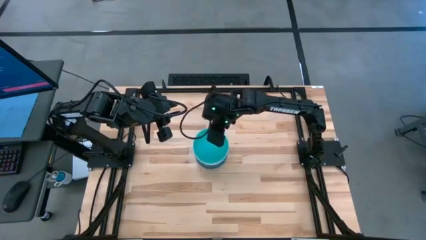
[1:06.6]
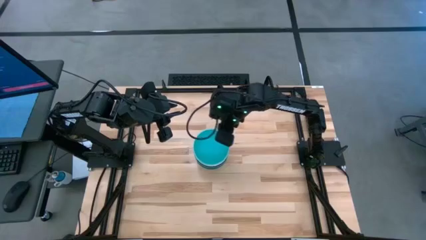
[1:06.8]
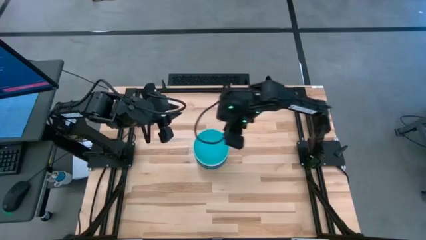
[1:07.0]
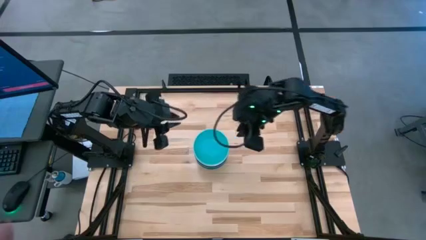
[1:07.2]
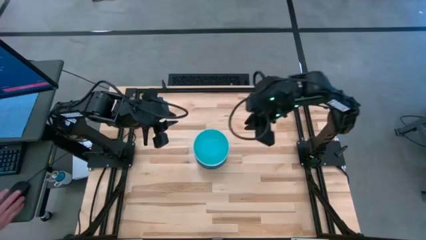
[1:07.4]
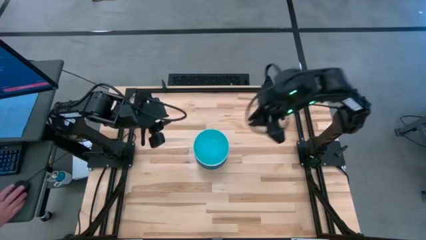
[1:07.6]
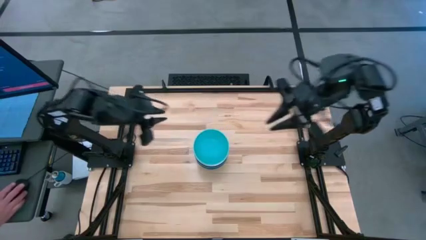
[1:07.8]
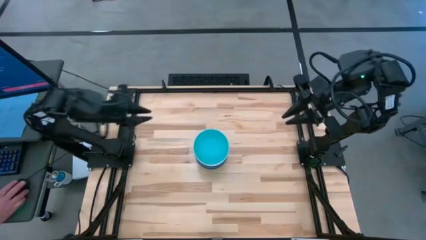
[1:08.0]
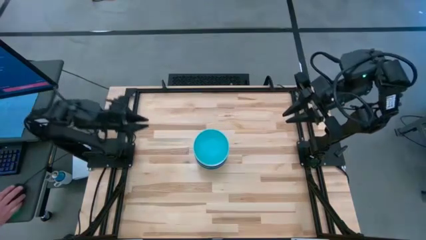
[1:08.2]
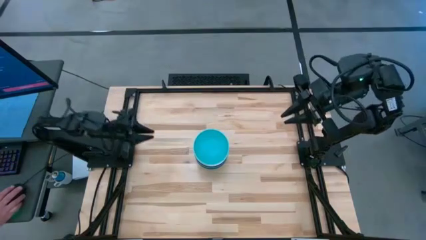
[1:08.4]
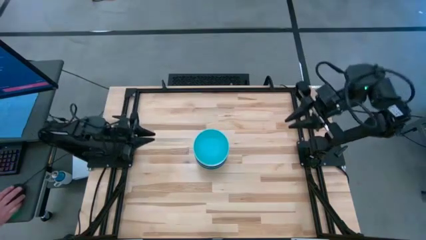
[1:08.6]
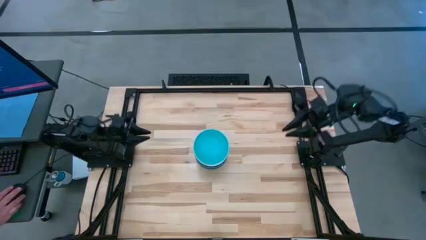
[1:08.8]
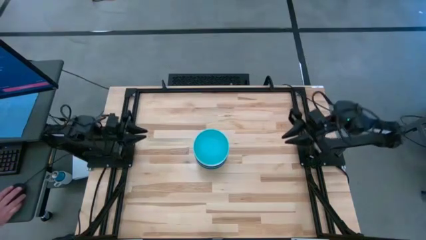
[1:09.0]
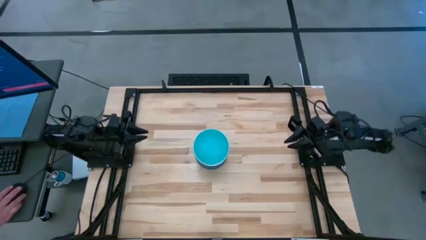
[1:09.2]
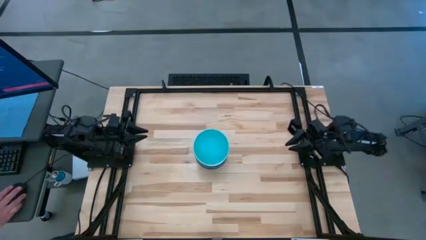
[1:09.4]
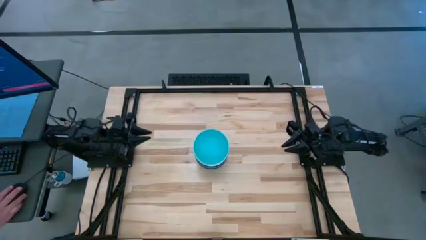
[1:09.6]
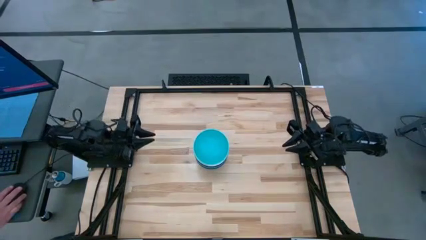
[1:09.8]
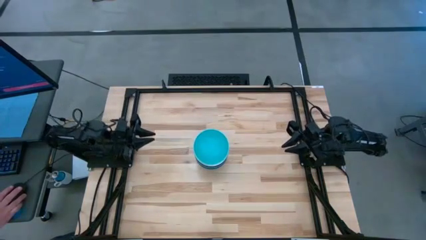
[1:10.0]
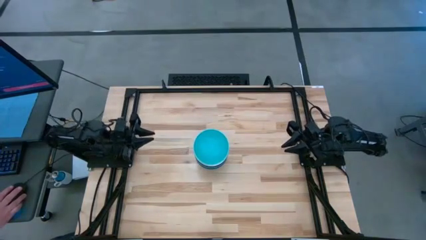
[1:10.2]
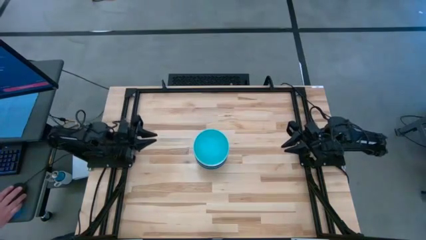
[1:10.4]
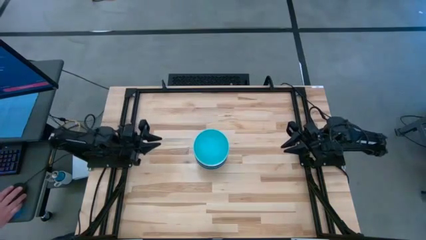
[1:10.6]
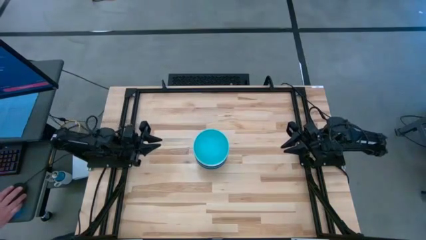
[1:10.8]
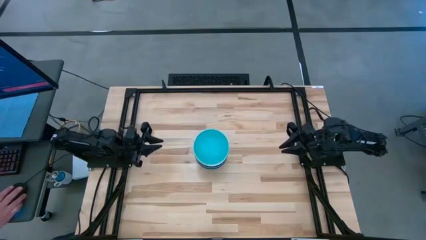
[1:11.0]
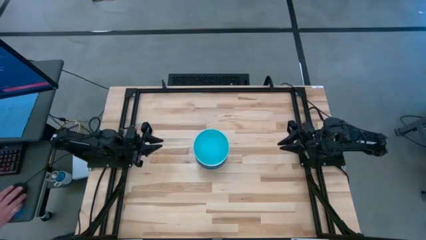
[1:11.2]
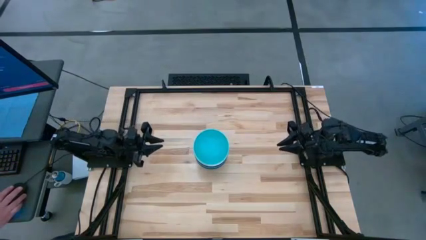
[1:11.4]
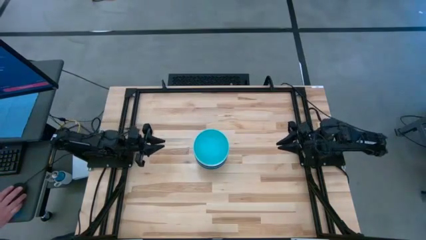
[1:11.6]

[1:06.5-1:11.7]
Task: Nest bowls inside each other
Return To Home Position

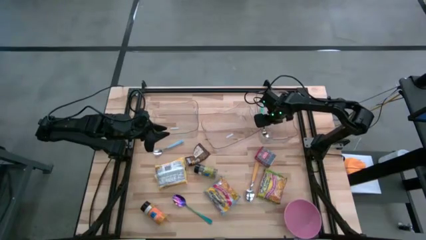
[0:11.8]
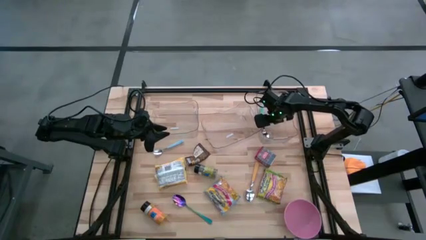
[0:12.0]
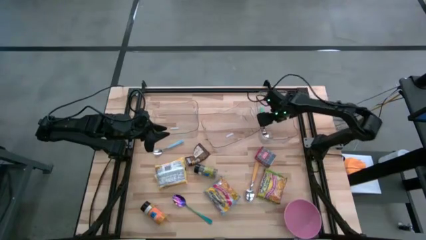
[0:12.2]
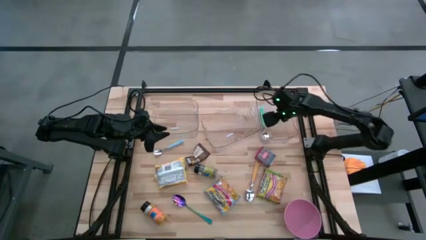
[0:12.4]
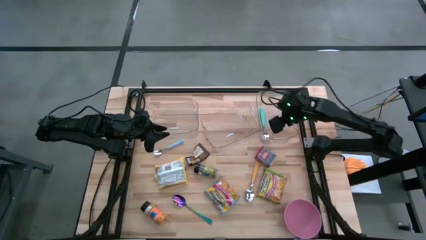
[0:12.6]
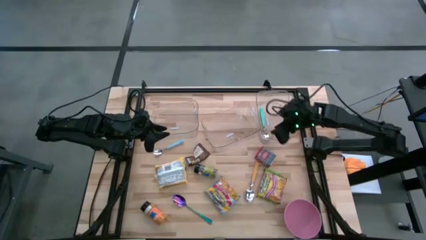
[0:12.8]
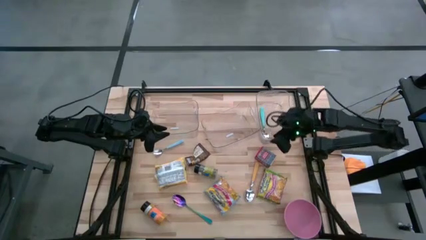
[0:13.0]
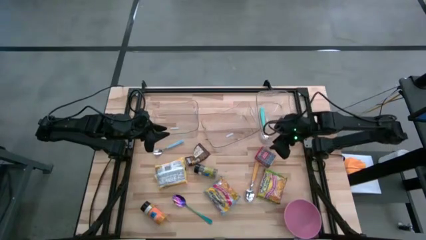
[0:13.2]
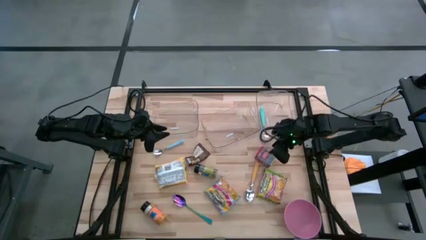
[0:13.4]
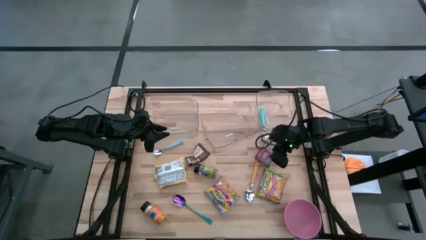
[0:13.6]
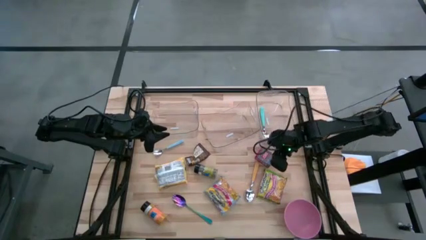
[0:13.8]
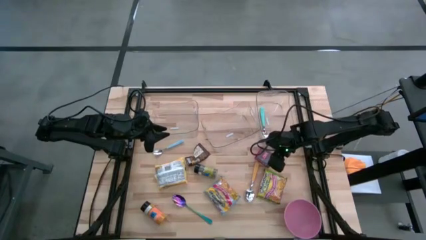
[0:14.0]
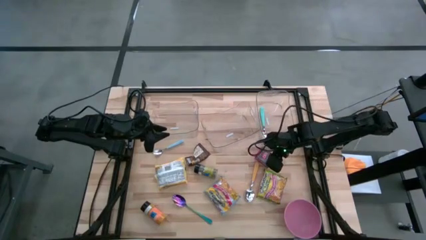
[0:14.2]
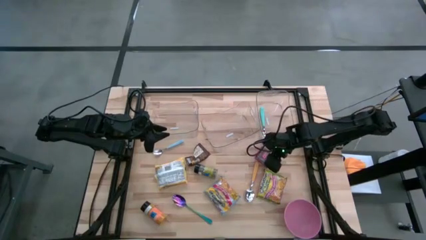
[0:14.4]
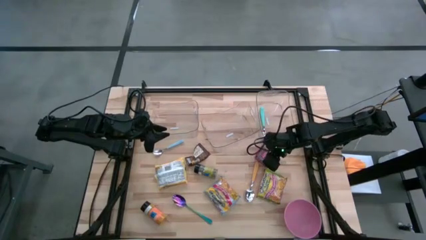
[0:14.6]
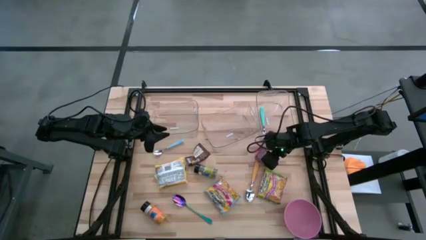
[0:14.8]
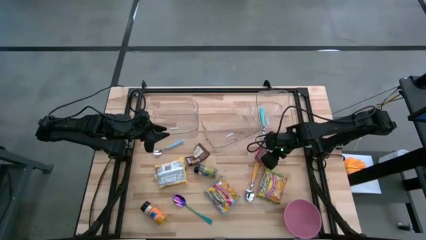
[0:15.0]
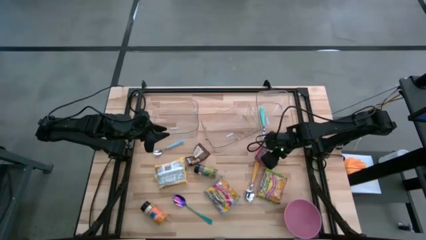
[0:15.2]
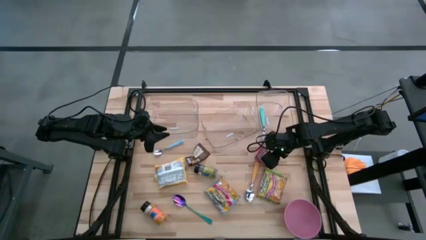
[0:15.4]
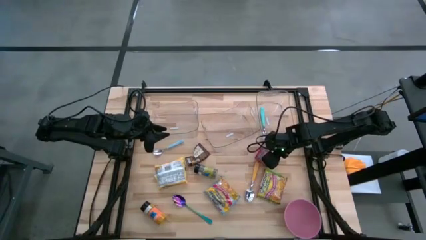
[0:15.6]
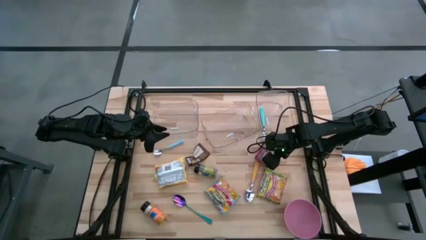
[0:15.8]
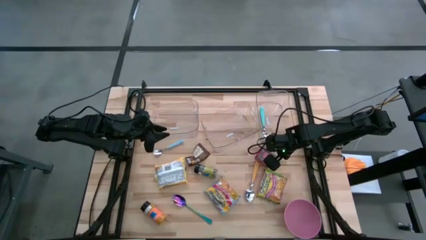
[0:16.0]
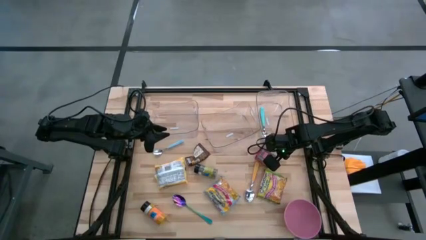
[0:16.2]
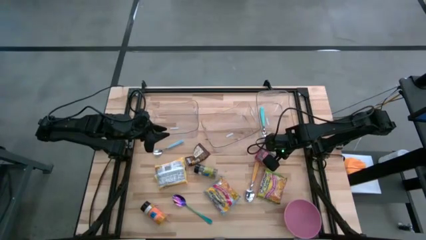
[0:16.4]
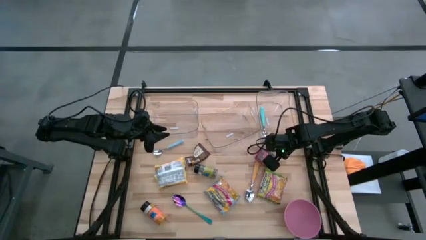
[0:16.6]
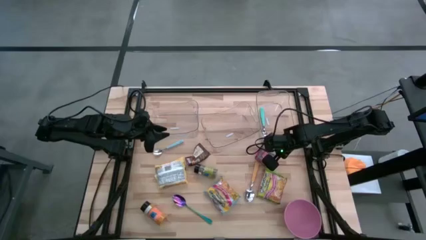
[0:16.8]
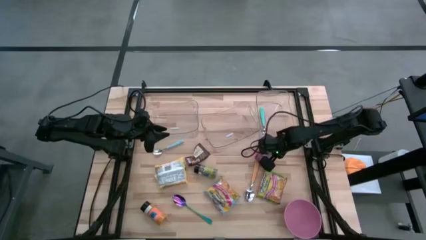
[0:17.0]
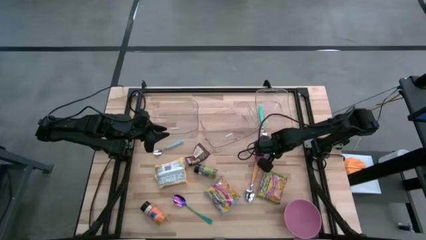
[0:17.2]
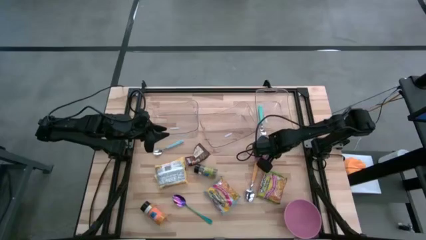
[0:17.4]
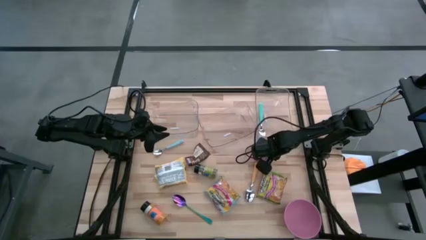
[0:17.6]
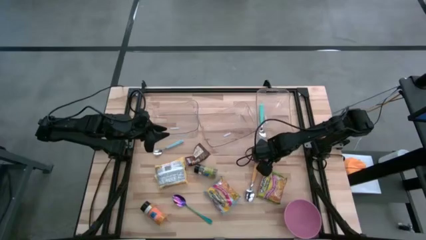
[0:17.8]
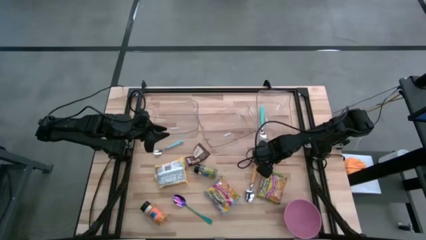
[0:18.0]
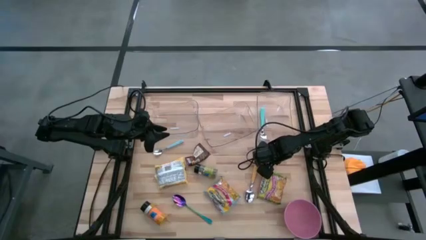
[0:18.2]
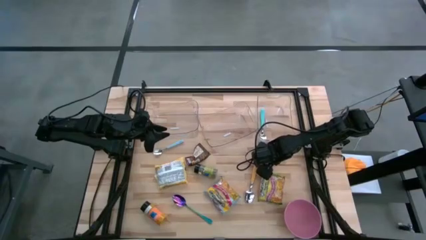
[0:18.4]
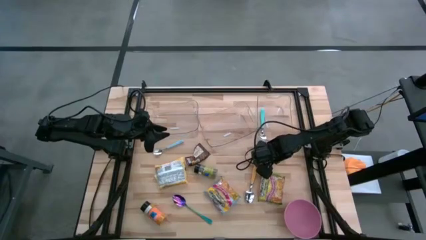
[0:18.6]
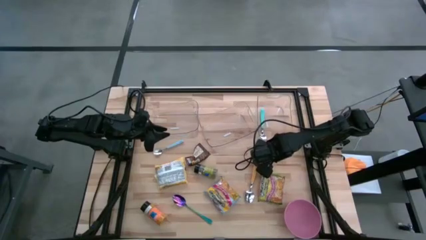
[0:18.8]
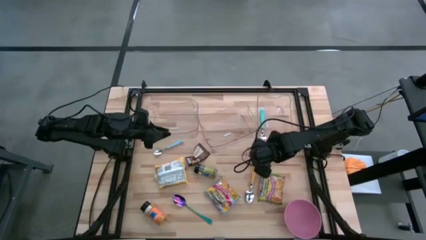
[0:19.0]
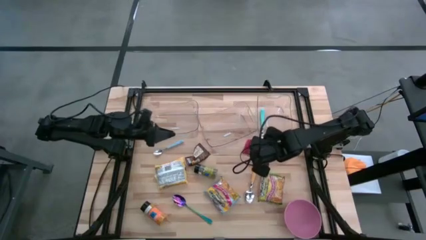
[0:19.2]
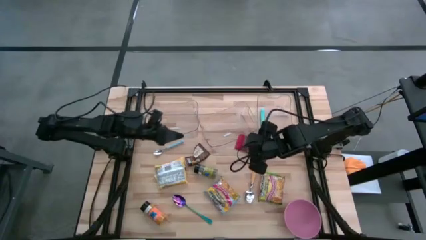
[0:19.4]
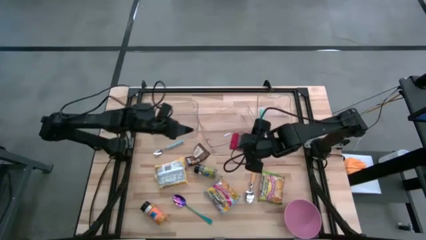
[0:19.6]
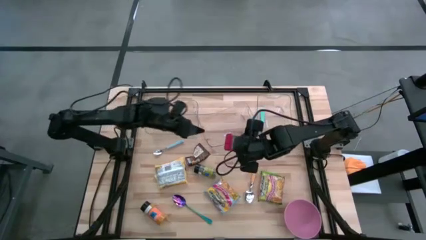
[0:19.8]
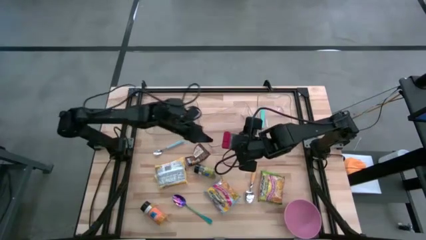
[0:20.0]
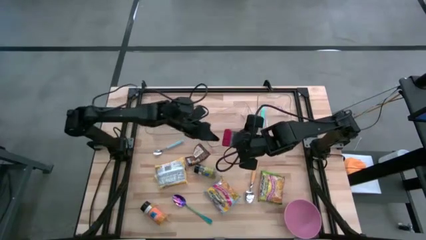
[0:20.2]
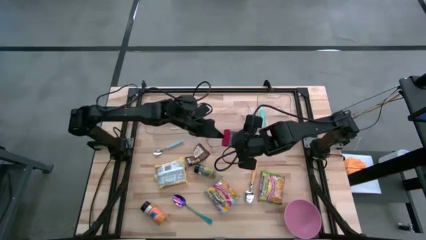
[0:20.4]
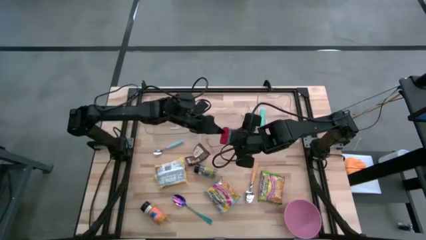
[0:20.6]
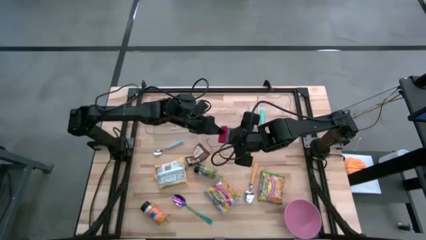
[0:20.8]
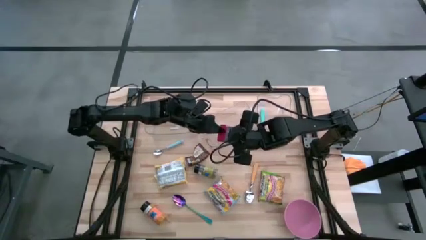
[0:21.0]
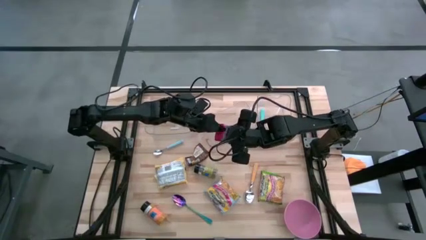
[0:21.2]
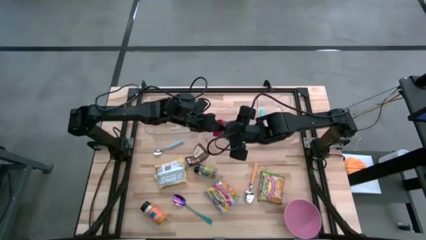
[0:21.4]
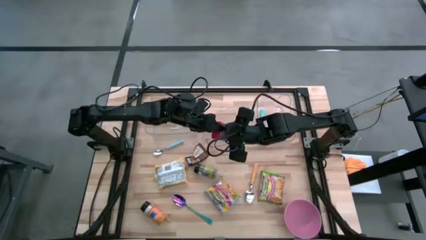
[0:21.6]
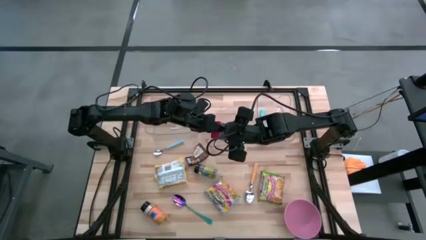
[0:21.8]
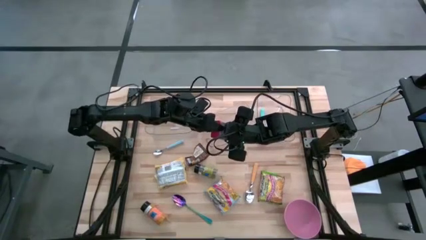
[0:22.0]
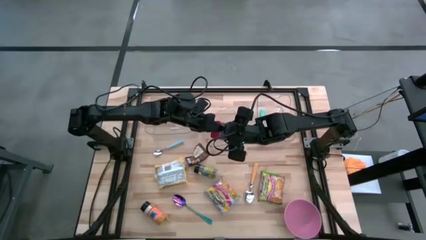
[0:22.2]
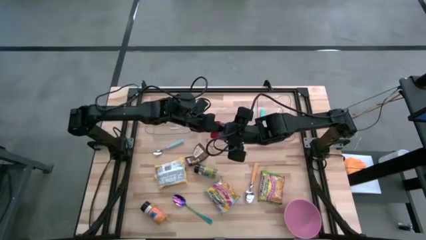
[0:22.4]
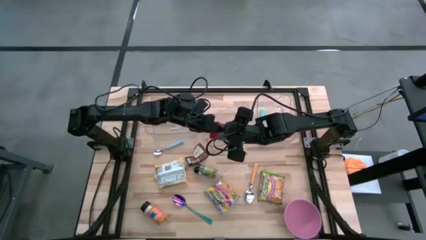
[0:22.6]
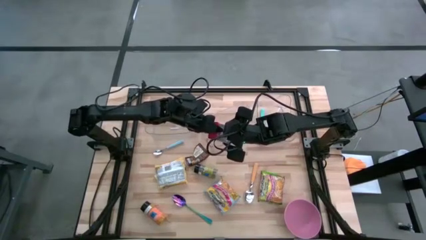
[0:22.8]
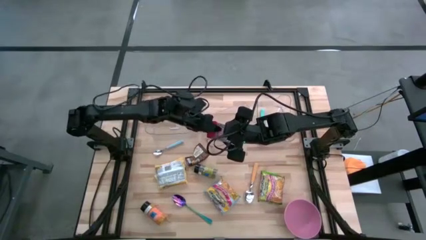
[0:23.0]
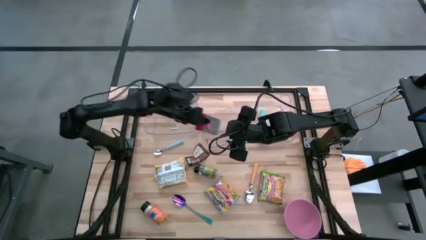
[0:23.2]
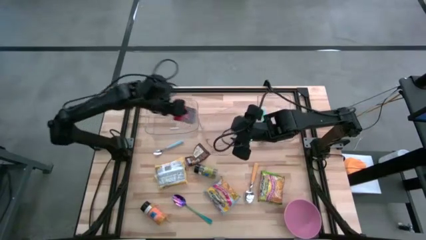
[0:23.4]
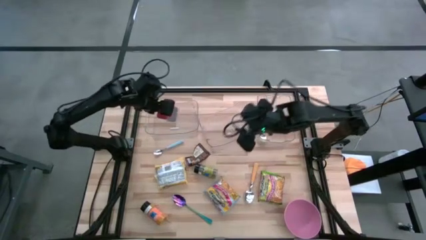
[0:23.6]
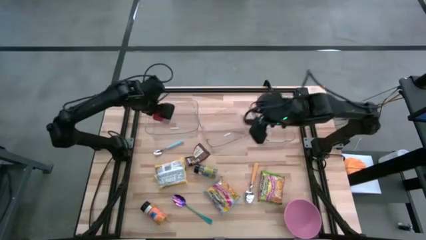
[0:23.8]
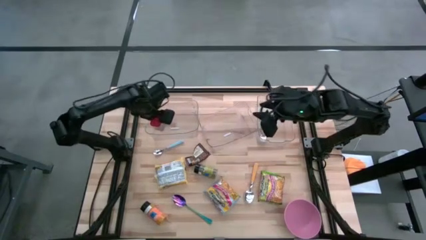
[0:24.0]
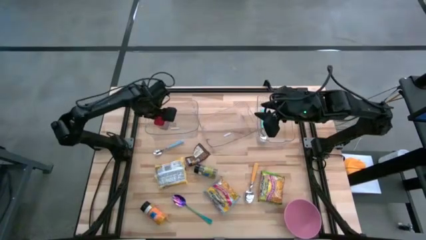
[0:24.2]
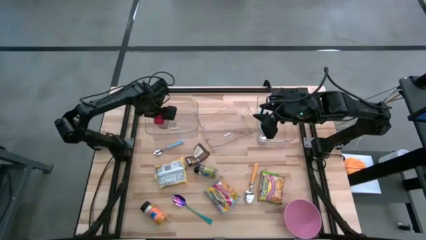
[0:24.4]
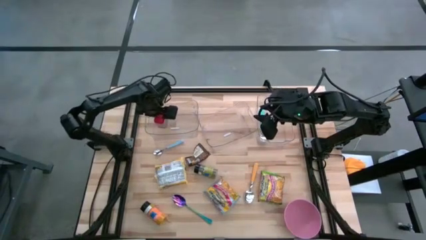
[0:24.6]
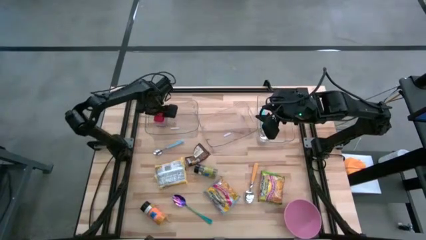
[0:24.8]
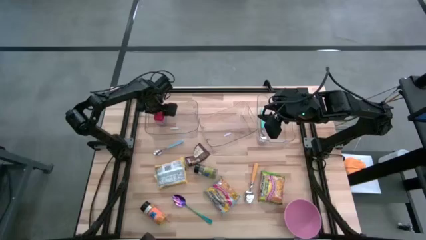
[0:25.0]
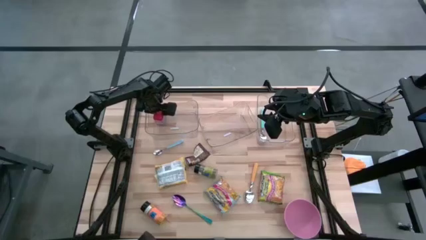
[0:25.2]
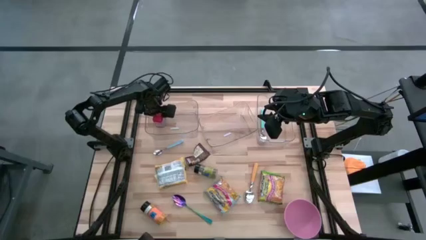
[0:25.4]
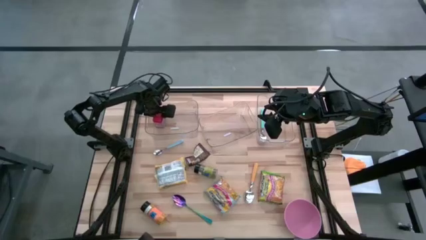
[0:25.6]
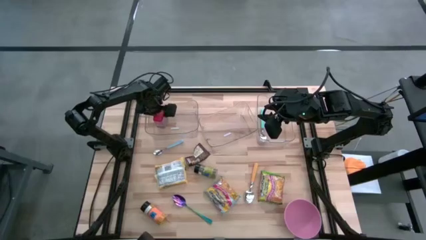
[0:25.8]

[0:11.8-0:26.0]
Task: Pick & Place Food Item
Put the red seasoning can into the left transparent bin
